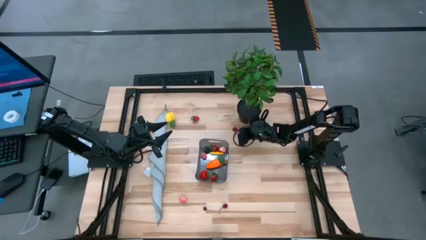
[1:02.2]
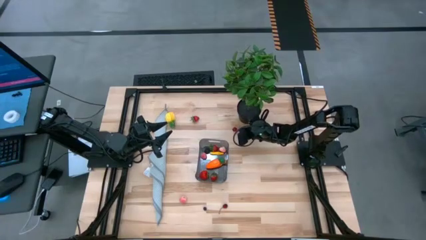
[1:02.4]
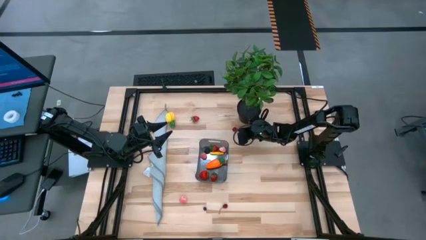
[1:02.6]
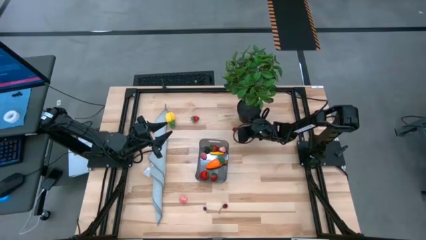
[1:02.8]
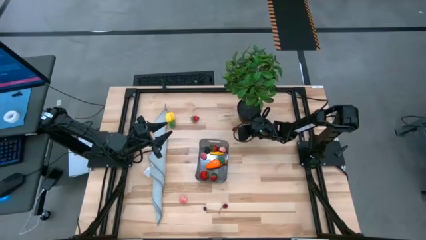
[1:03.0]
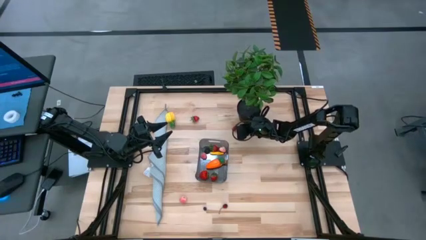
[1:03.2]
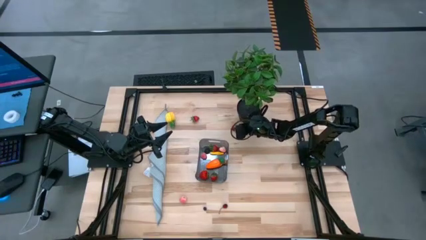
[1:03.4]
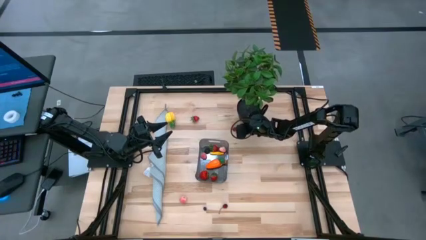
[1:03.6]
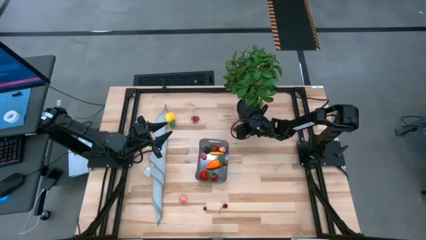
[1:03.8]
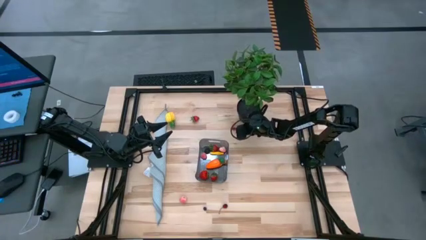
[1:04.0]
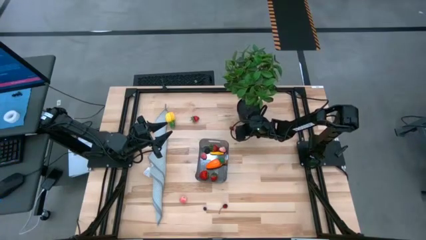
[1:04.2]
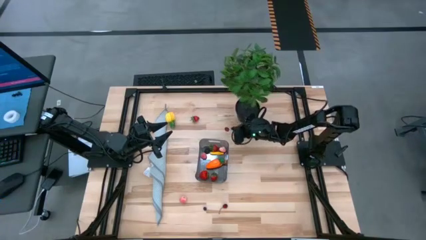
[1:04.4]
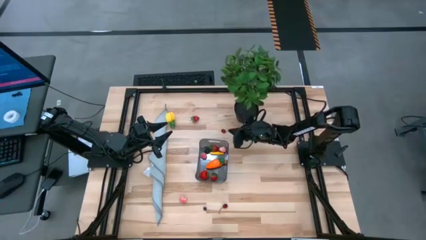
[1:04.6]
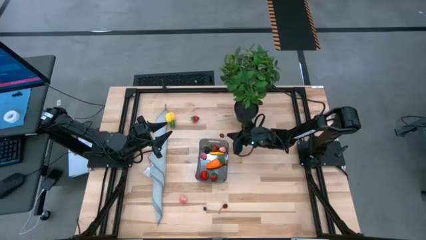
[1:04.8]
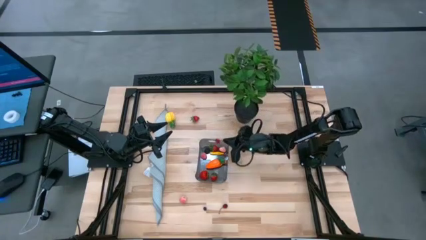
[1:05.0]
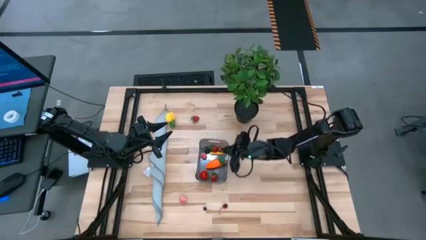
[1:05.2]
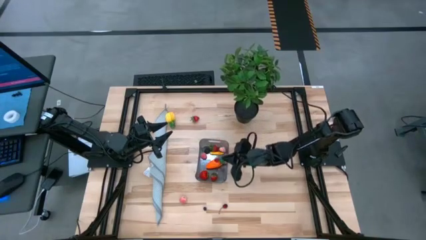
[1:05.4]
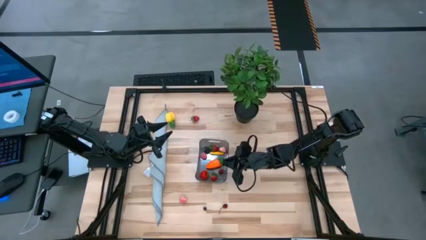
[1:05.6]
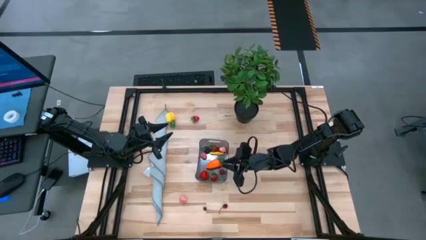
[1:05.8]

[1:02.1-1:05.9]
Task: Pick and placing Produce into tupperware
Put the top cherry into the bin

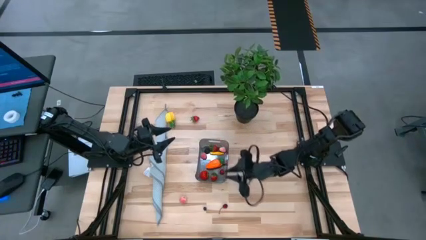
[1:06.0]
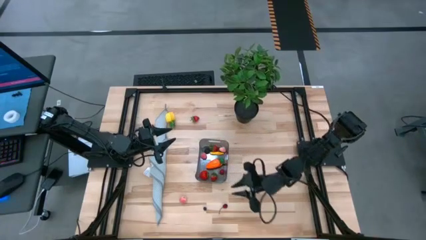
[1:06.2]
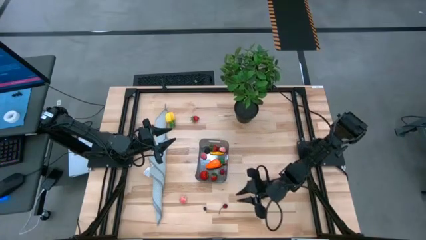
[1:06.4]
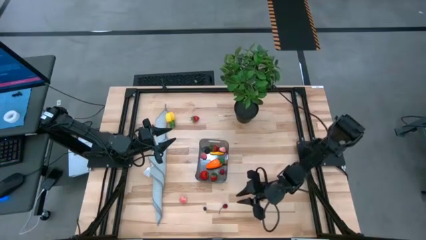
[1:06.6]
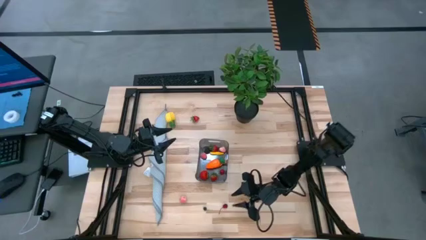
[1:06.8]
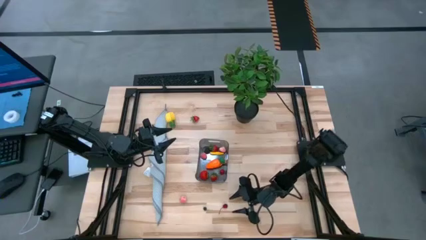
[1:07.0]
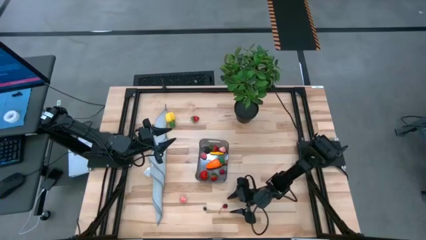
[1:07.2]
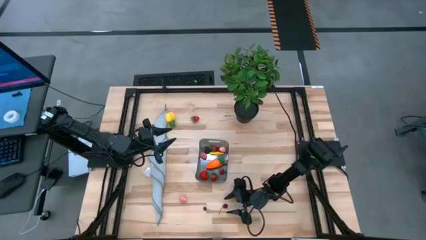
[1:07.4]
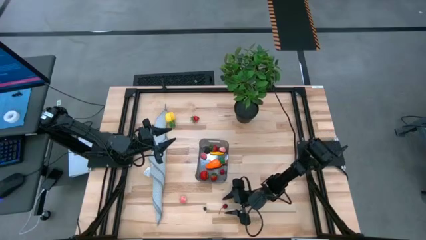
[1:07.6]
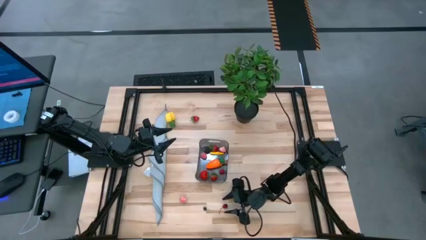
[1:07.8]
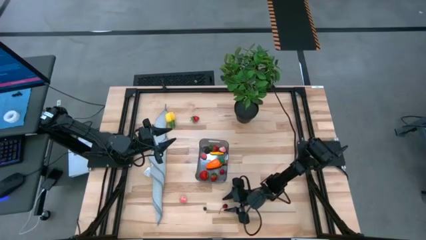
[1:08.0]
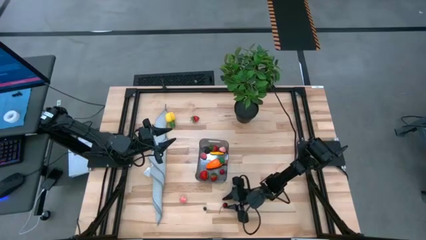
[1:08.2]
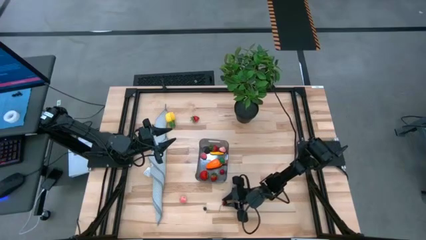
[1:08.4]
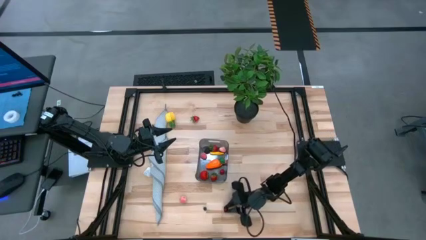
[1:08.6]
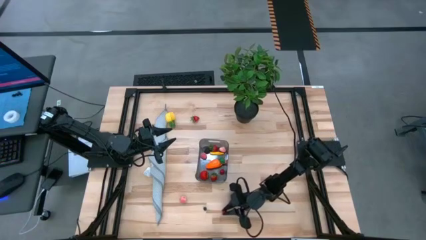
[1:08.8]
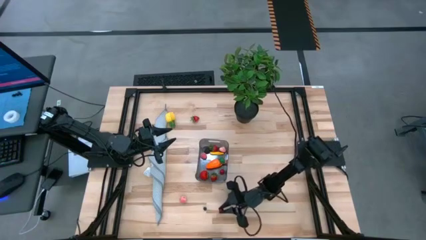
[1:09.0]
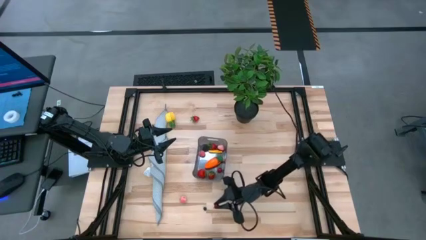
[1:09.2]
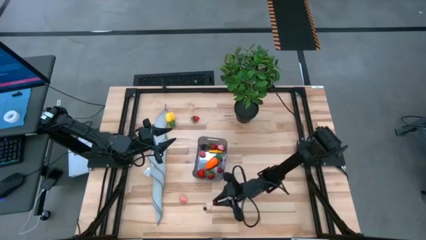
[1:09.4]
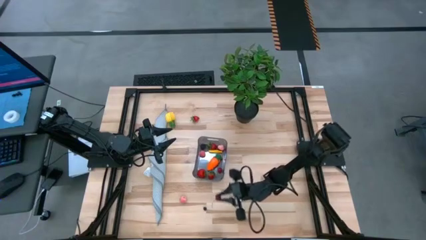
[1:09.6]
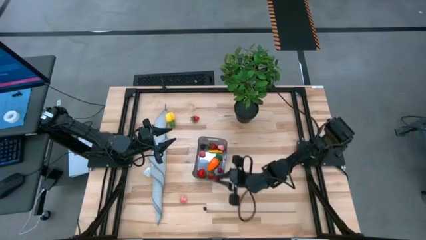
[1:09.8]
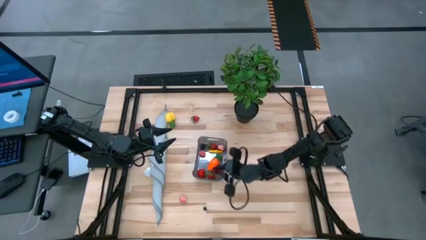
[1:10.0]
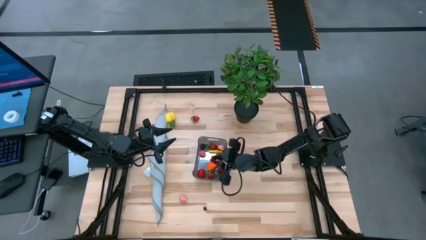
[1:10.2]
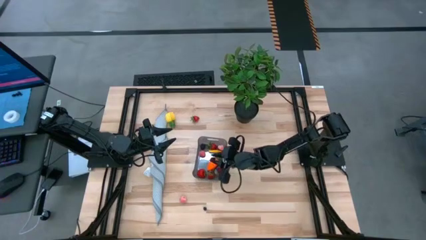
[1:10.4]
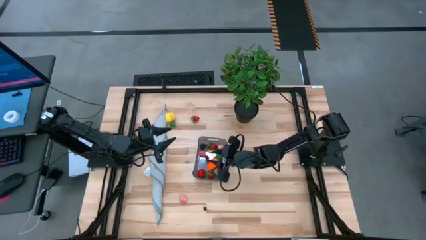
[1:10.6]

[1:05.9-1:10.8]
Put the cherry into the bin

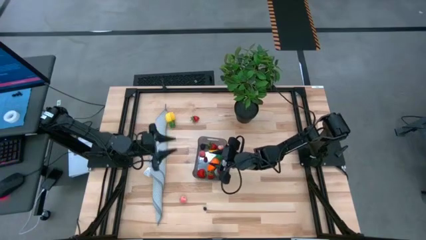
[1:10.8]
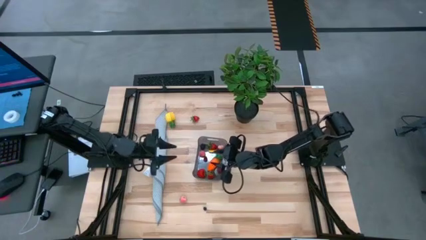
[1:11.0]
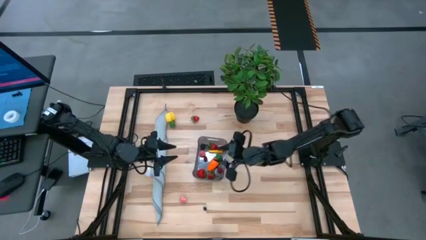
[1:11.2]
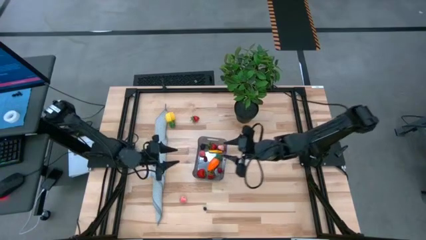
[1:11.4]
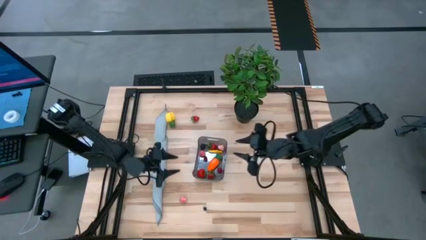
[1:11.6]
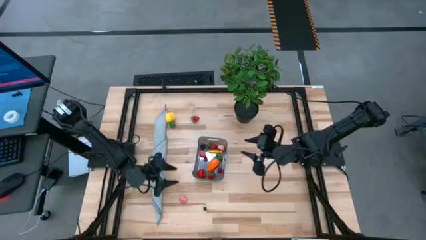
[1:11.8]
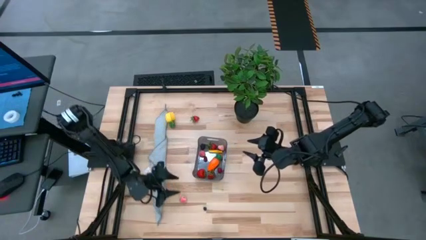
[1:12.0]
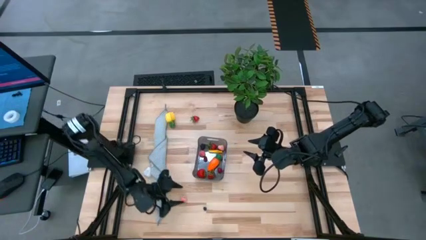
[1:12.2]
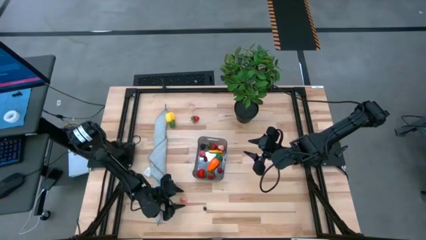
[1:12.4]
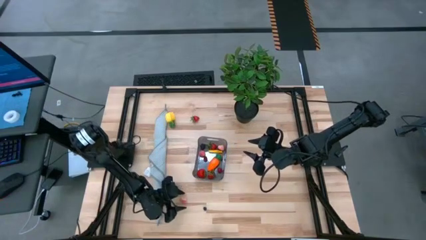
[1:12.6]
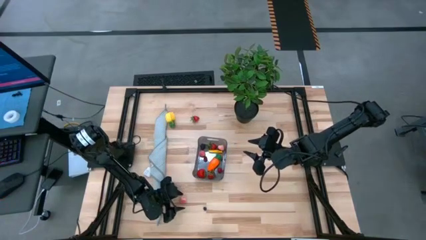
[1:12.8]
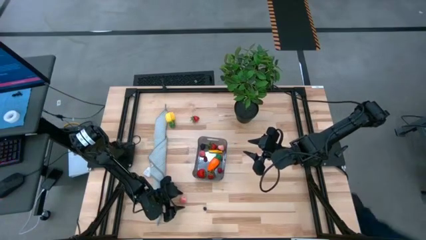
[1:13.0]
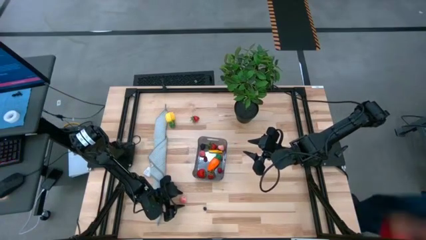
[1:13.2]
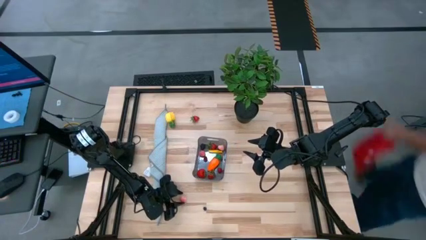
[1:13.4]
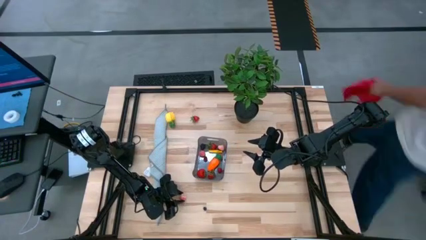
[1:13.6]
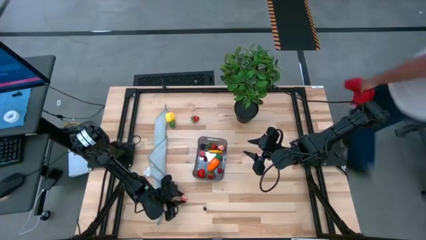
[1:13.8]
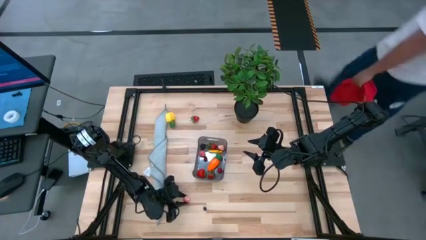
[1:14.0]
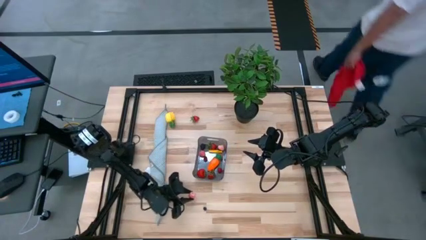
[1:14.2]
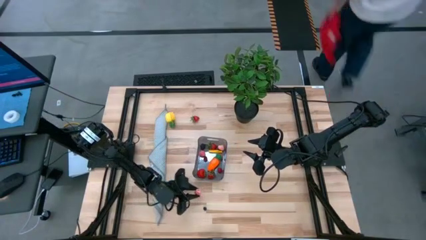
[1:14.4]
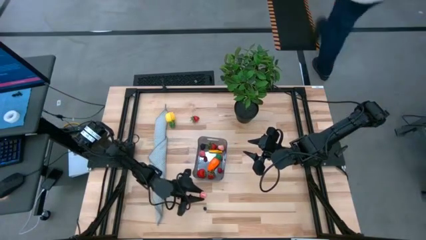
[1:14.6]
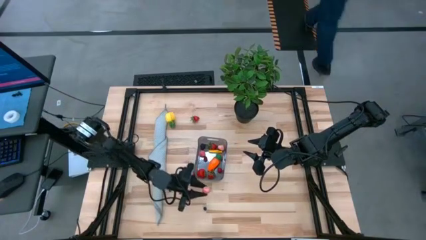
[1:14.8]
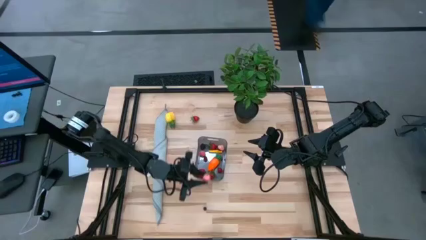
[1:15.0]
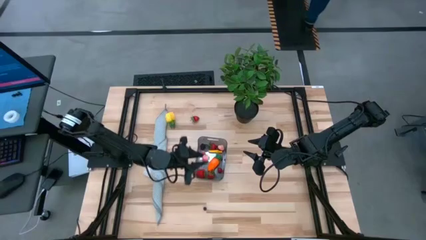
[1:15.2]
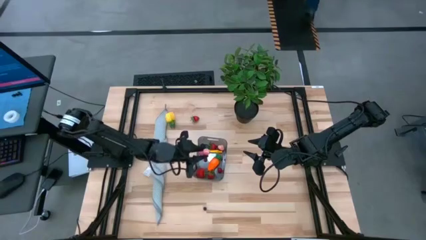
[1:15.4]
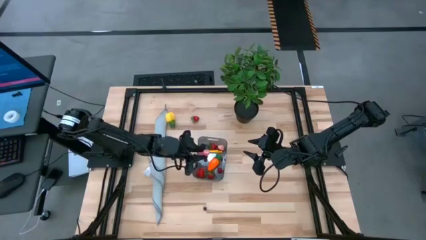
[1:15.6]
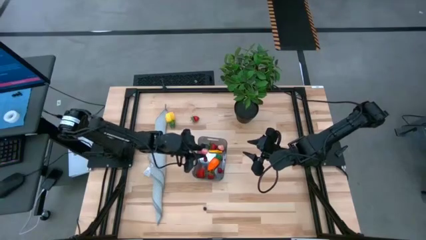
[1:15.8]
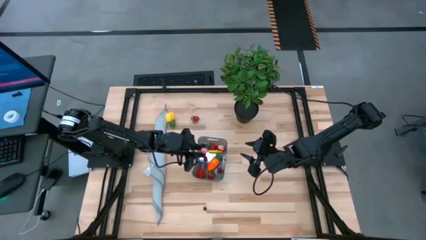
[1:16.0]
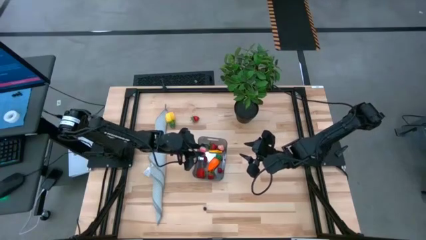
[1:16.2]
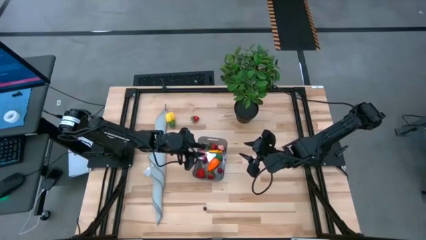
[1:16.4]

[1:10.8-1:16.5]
Put the peach into the bin

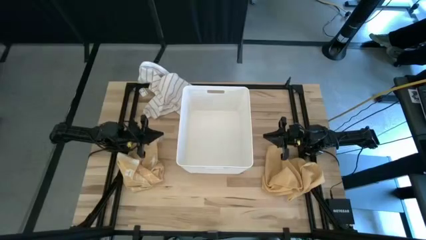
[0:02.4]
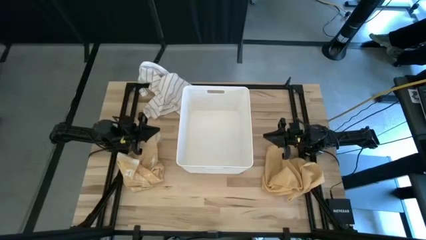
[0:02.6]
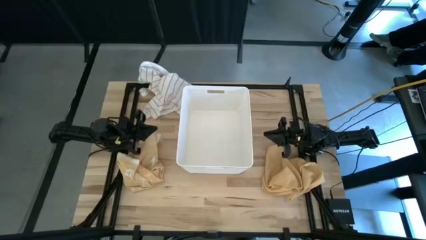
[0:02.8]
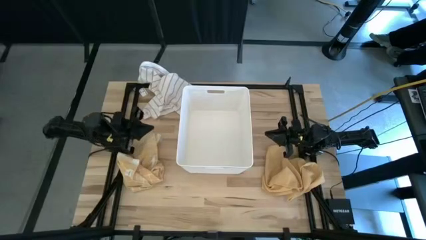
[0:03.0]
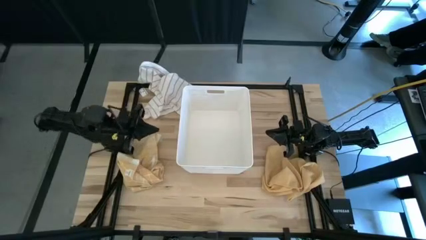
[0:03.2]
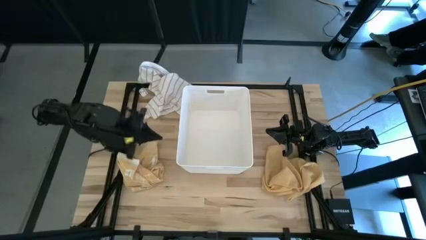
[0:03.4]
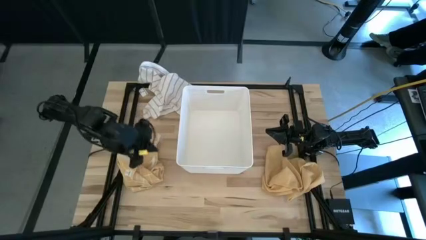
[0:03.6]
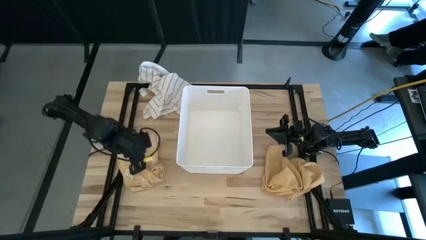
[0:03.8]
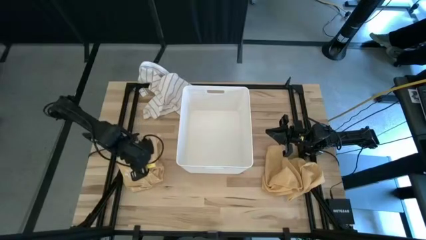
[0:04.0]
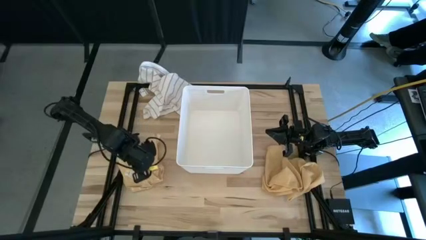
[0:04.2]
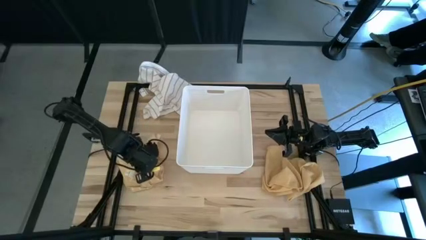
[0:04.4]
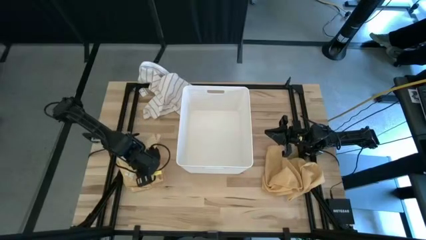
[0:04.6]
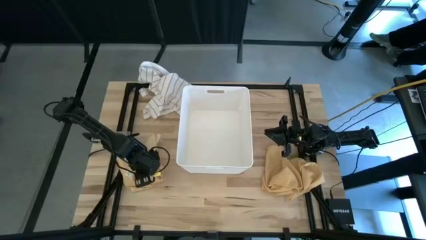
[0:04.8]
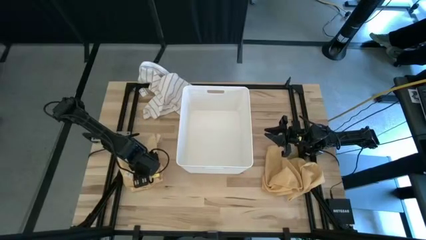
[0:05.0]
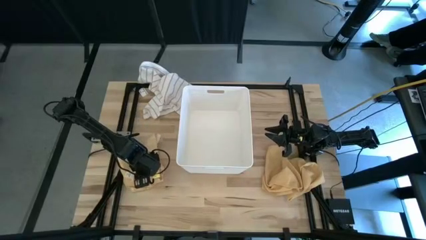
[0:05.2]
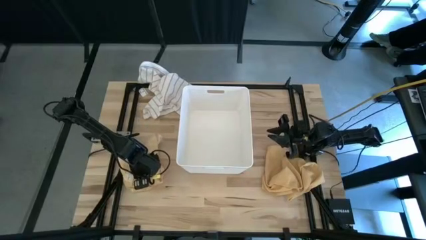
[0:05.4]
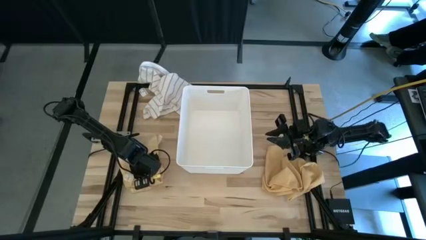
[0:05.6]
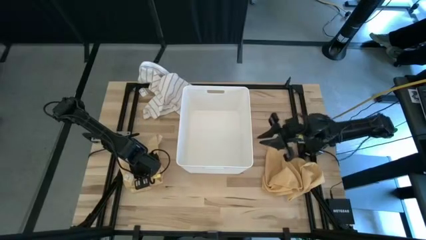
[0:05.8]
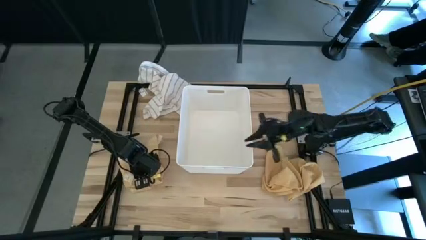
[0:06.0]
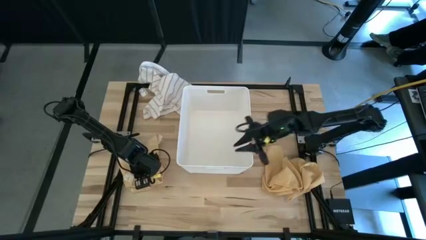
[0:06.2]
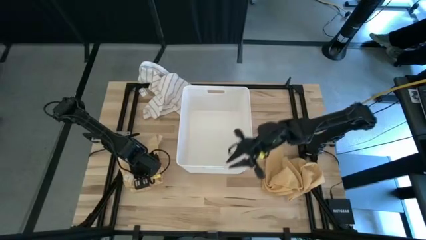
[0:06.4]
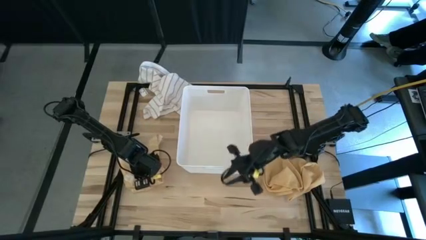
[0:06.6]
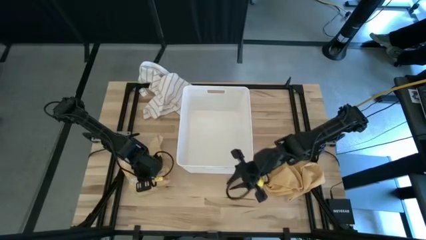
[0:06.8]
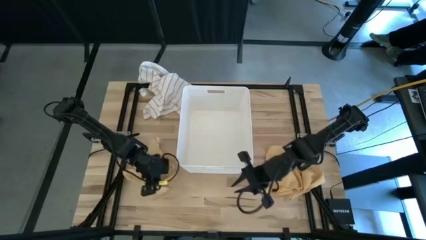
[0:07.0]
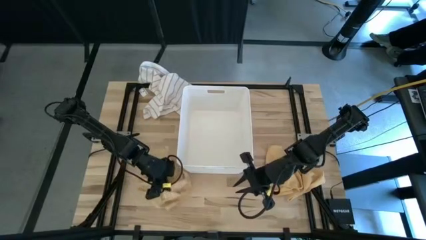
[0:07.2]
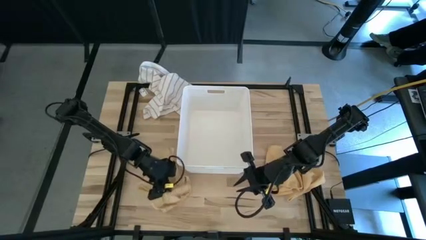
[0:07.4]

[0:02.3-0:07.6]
Task: Fold towel
Move the yellow patterned towel
